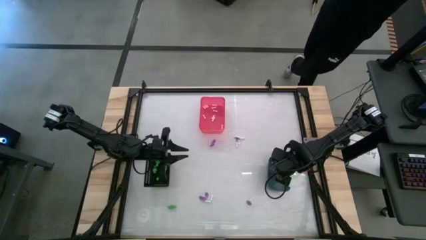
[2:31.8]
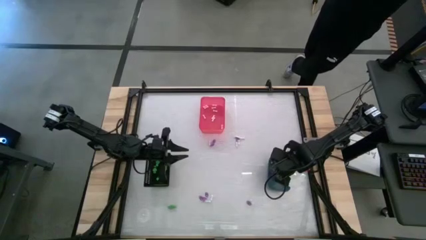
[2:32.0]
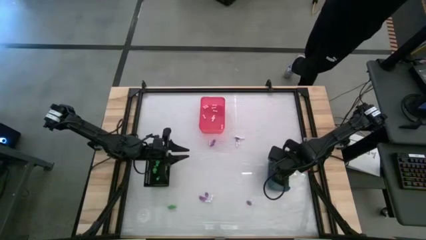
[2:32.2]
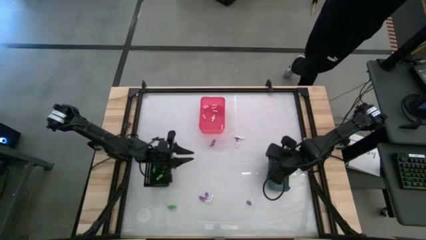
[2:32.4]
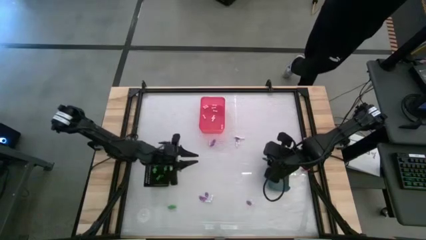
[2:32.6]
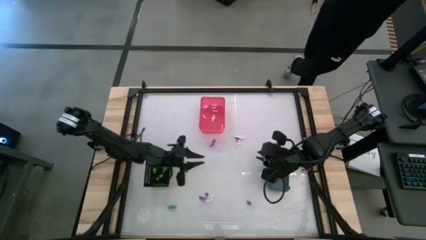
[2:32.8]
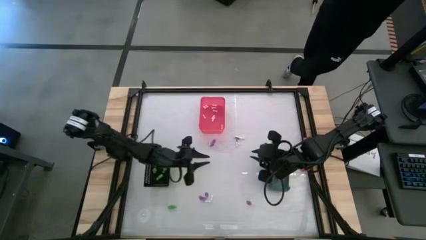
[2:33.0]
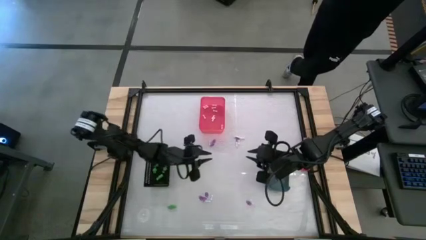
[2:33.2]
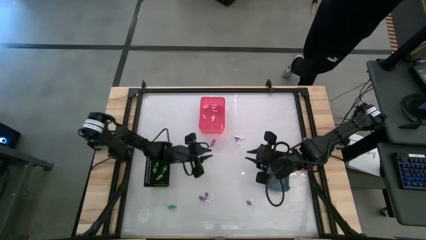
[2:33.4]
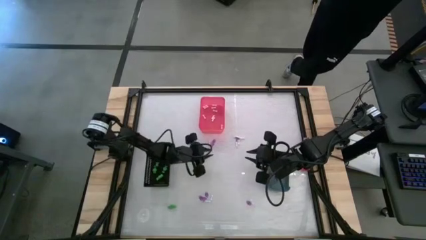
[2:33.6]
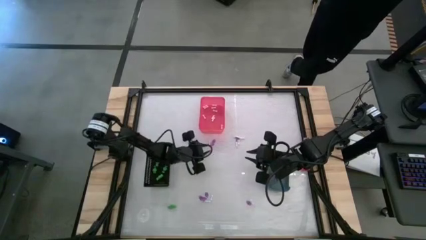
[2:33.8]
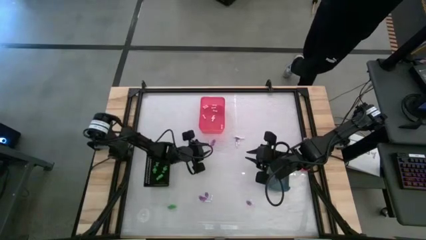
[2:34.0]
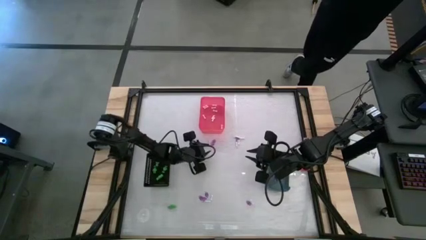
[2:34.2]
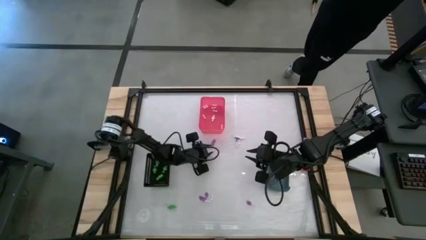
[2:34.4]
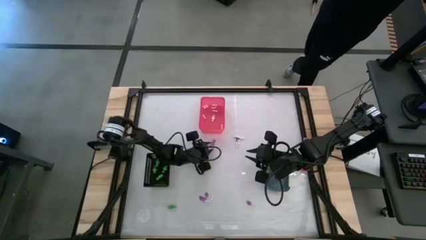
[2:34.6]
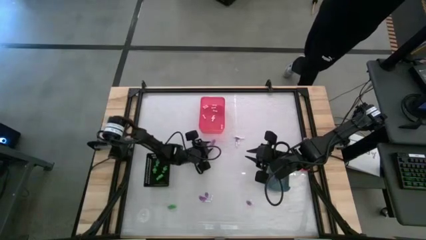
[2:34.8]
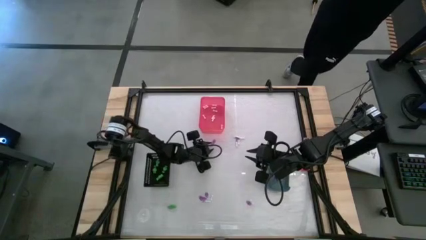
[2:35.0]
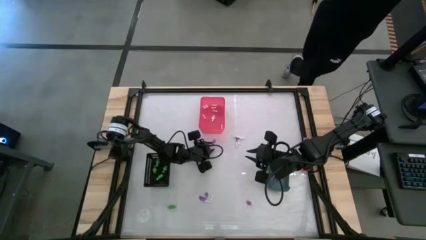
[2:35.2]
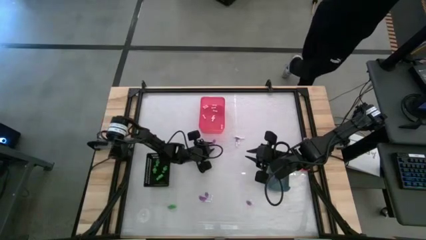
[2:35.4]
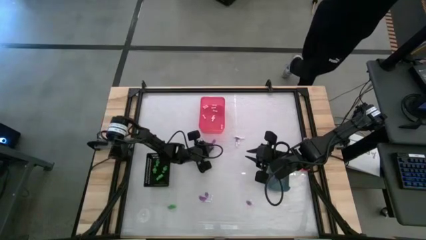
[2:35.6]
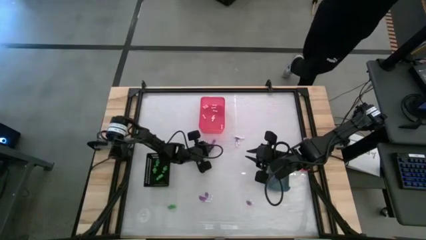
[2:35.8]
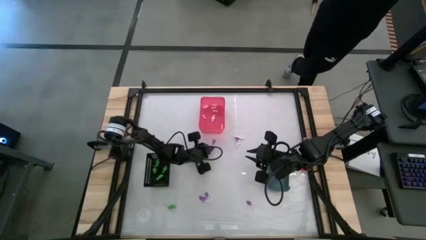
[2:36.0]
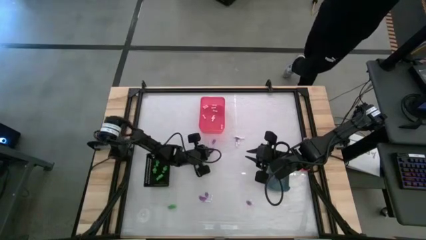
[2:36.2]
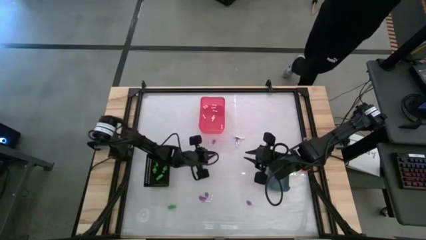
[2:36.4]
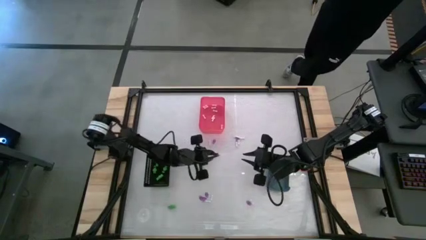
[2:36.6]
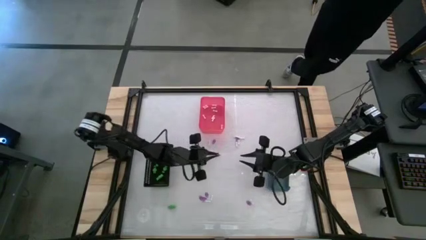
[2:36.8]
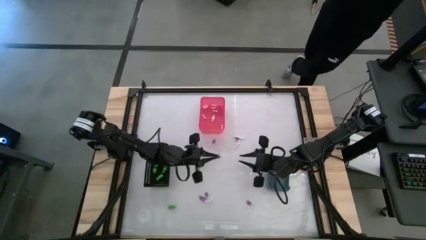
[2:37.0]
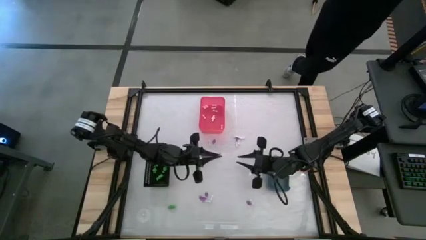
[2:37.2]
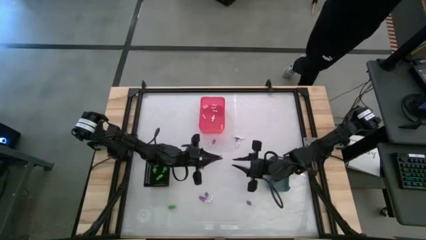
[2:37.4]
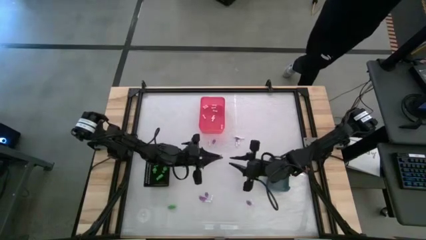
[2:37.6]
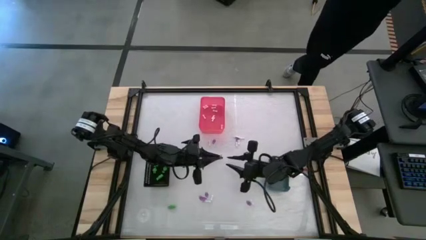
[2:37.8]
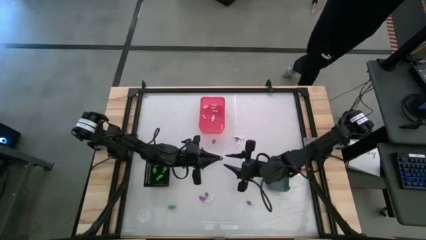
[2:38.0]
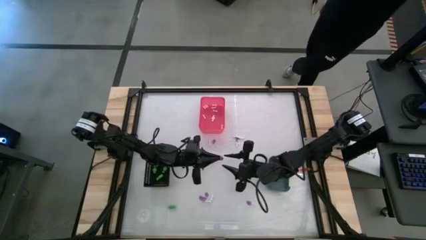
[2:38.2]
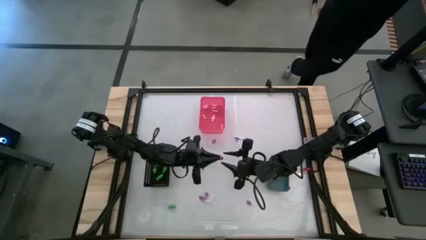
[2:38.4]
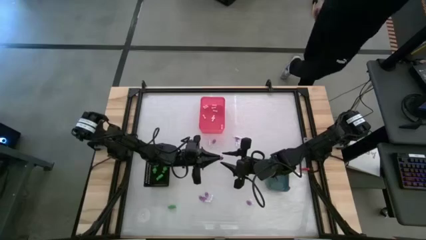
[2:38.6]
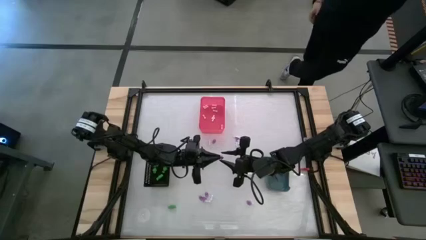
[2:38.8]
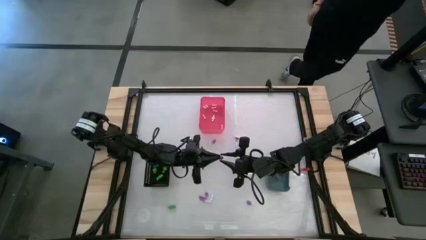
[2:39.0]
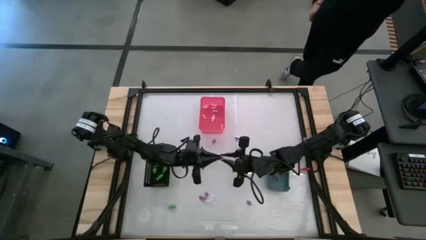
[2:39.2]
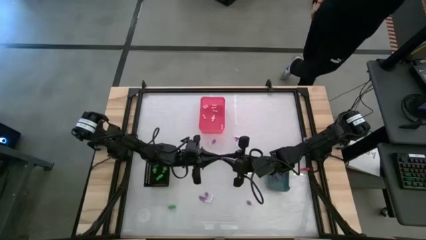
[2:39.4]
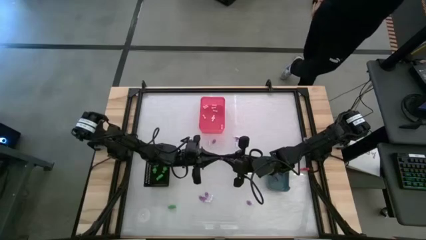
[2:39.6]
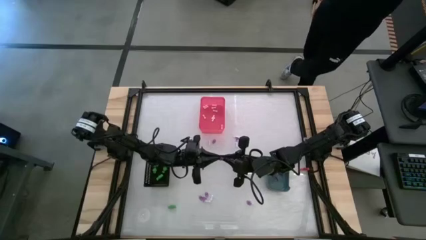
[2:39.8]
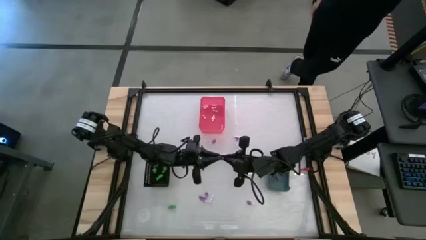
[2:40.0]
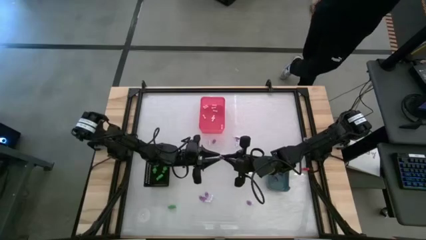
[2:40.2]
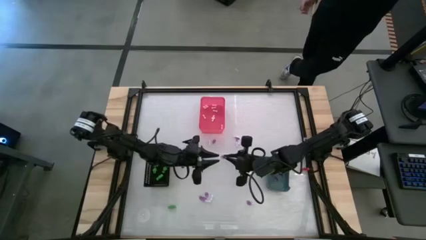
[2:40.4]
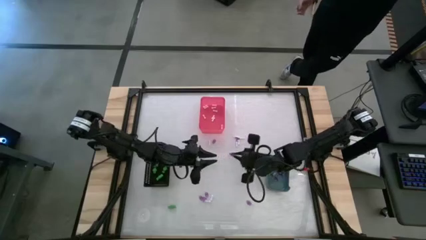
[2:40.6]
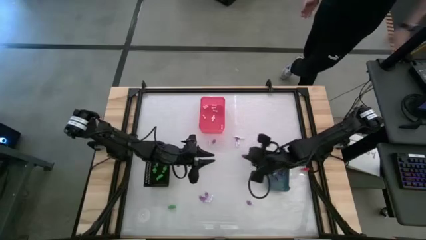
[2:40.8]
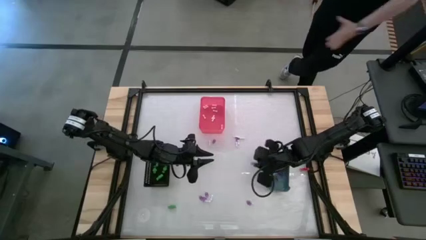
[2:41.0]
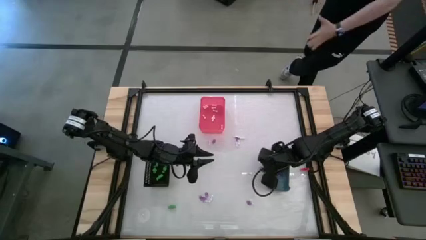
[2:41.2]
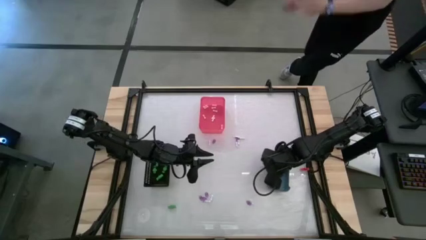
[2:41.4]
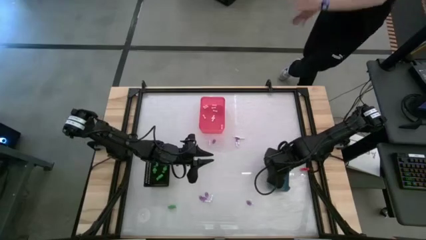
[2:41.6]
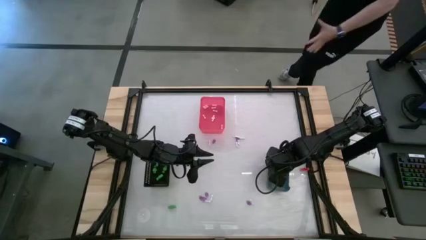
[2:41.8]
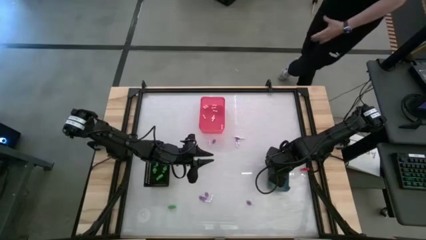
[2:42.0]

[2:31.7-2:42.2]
Task: Sort Halloween decoration
Put the witch hat toy into the blue bin

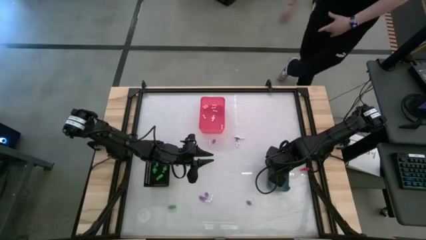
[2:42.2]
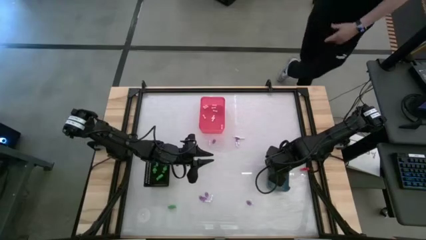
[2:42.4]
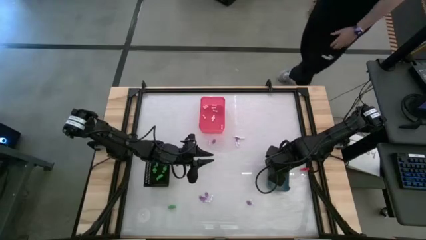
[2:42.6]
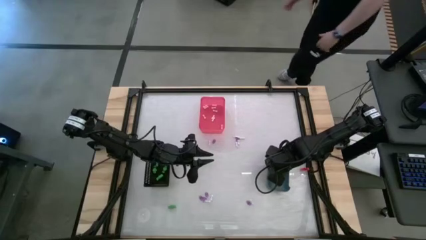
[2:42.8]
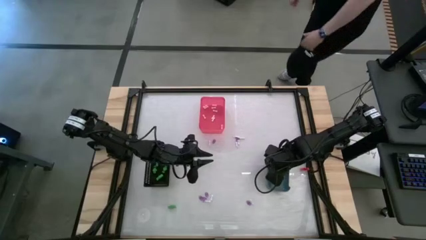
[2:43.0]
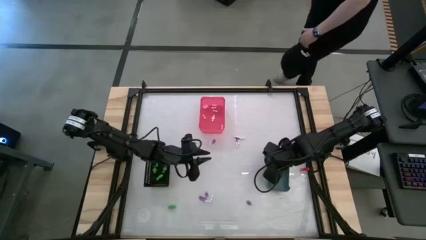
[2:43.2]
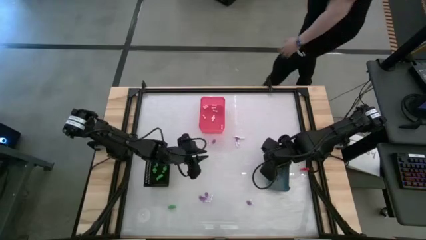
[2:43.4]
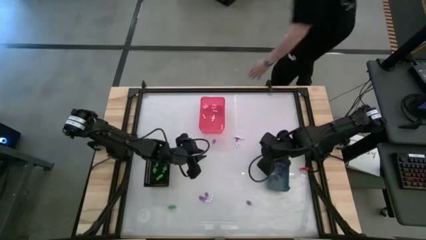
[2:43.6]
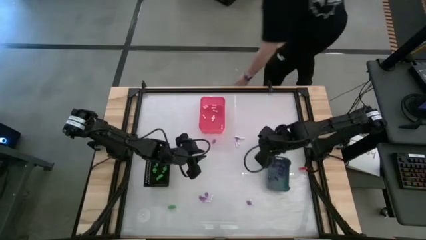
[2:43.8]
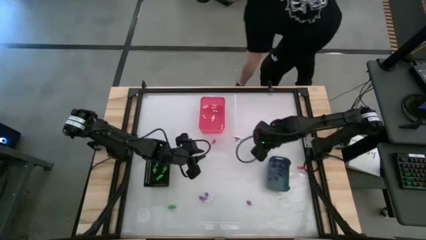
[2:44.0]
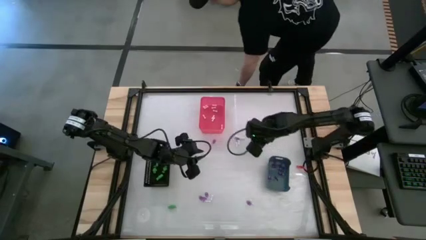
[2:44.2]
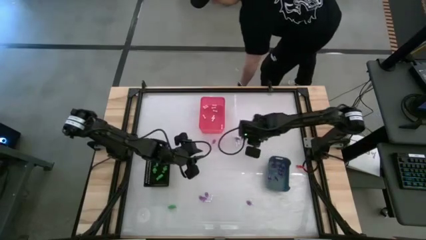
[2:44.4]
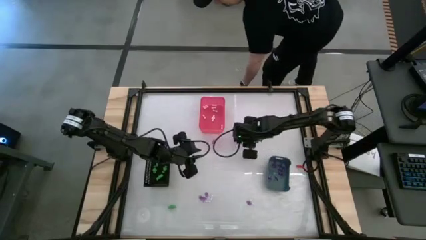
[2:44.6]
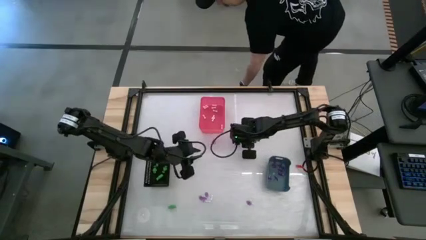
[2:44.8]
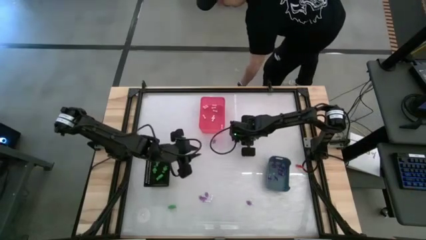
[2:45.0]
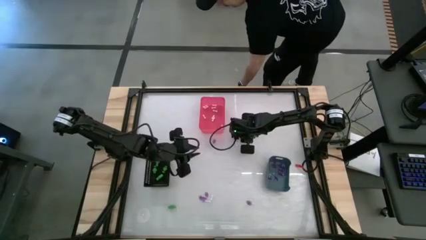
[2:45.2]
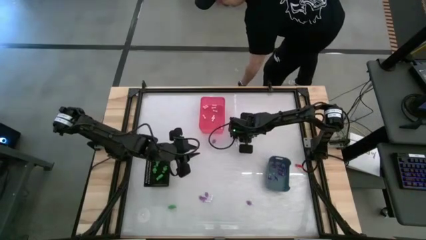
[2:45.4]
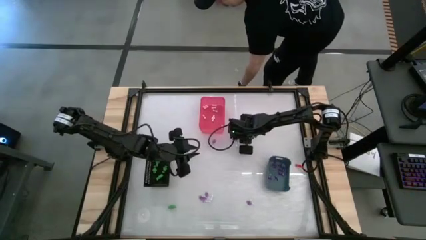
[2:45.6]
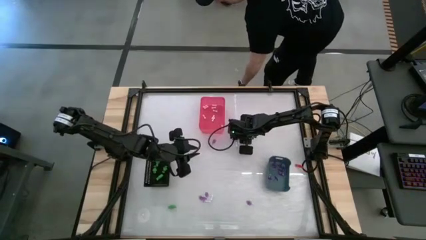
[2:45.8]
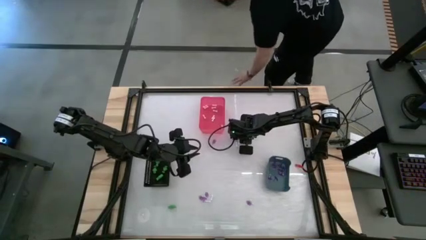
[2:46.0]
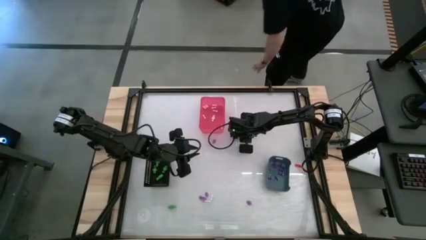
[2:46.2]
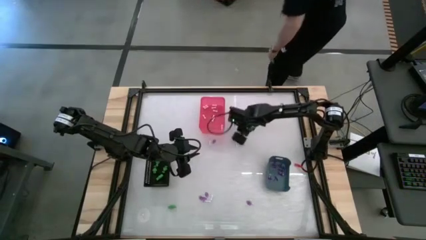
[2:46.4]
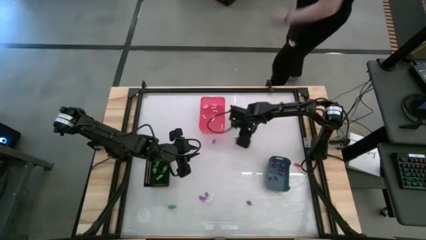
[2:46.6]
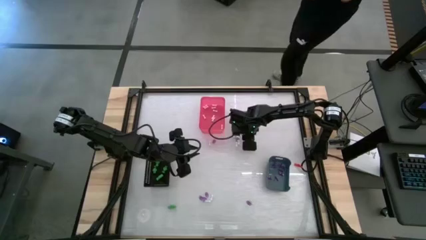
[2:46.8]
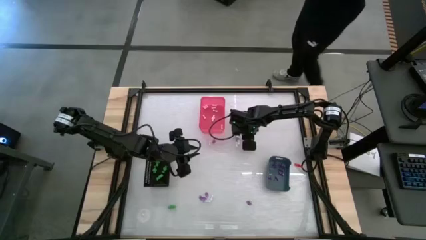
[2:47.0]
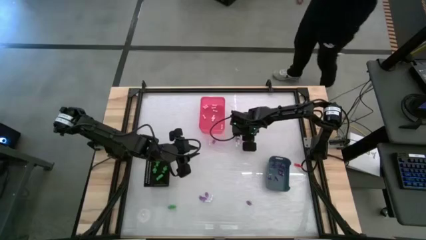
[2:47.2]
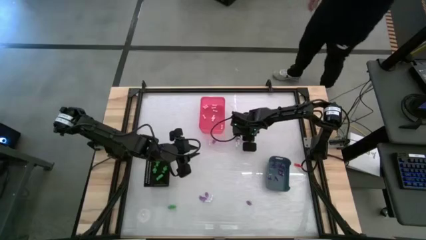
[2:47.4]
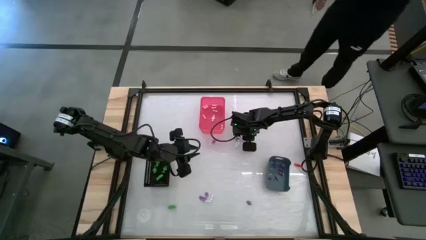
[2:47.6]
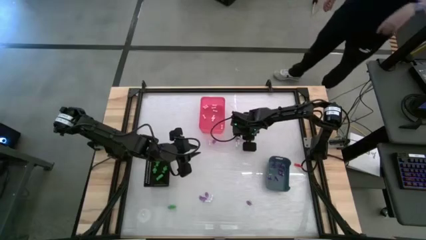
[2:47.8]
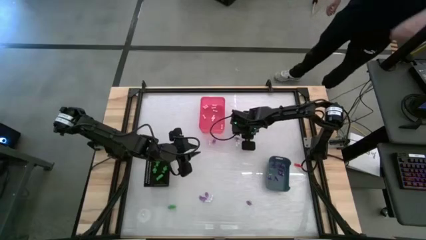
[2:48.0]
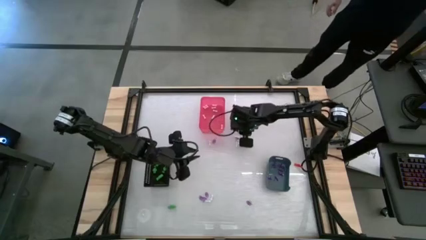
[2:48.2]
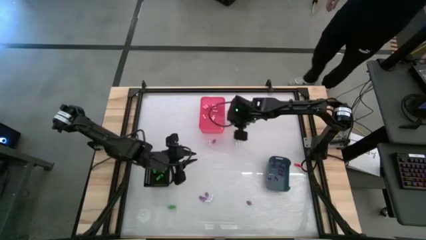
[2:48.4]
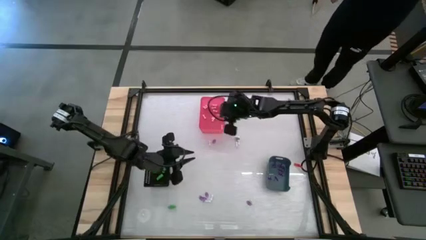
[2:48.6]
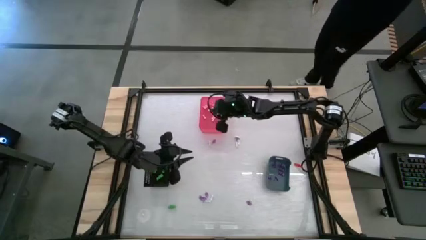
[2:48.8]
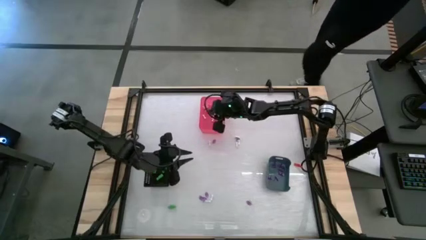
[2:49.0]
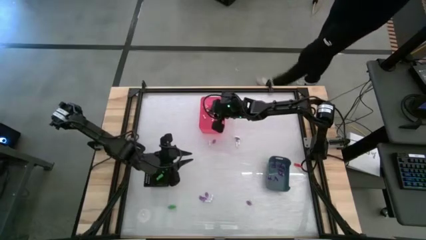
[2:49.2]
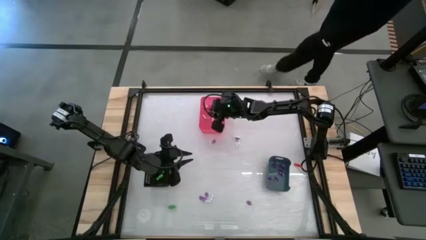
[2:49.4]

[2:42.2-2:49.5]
Put the bone toy into the red bin
